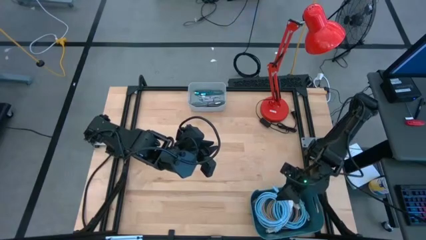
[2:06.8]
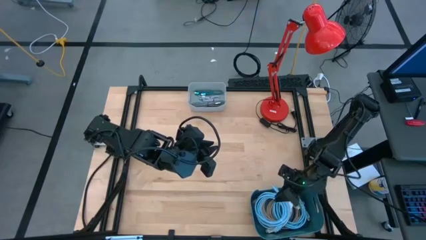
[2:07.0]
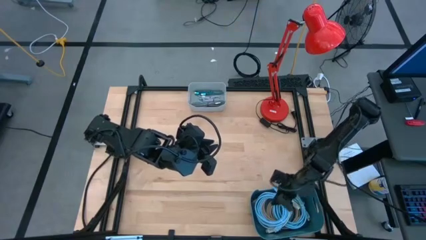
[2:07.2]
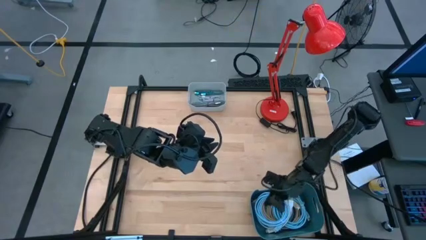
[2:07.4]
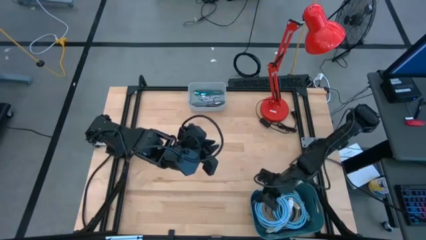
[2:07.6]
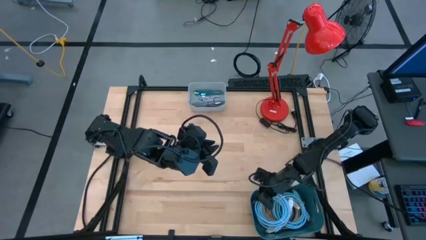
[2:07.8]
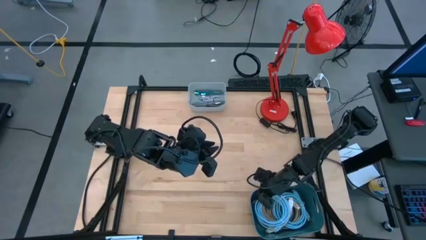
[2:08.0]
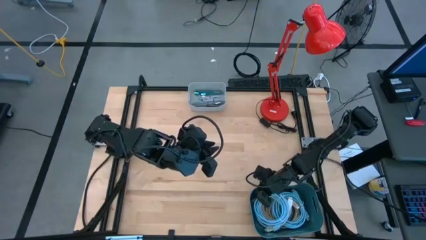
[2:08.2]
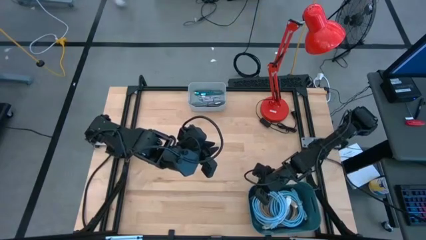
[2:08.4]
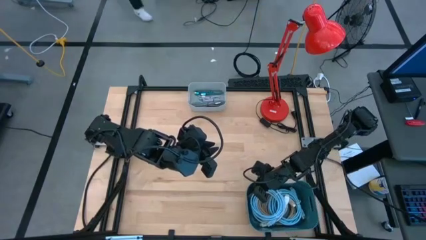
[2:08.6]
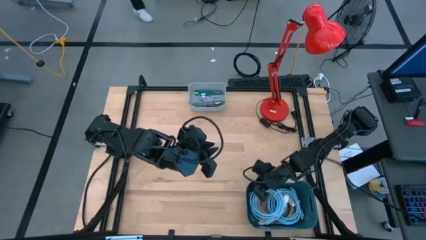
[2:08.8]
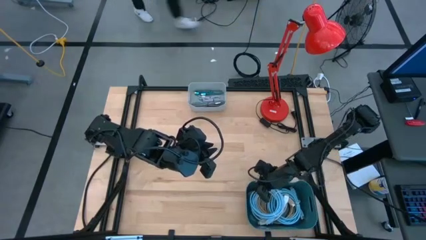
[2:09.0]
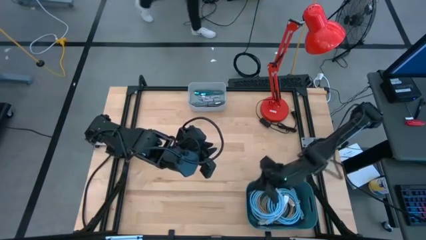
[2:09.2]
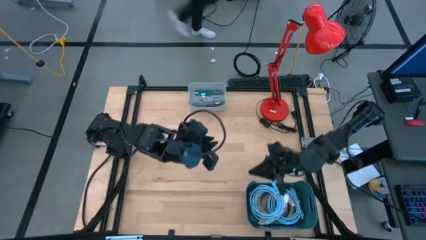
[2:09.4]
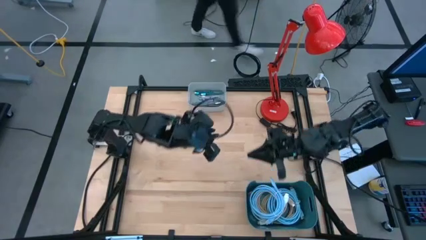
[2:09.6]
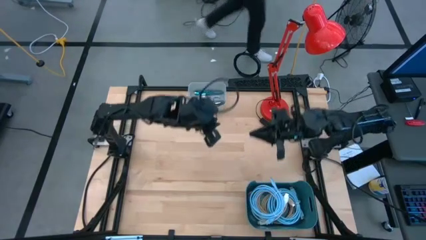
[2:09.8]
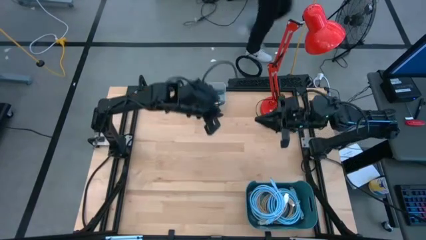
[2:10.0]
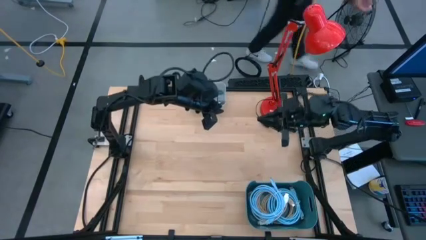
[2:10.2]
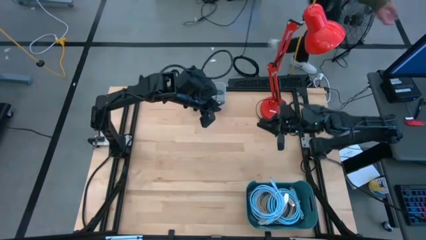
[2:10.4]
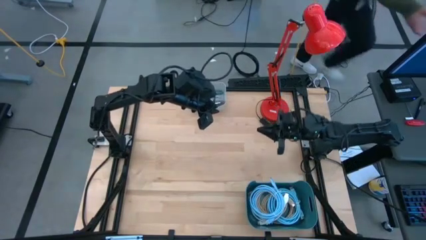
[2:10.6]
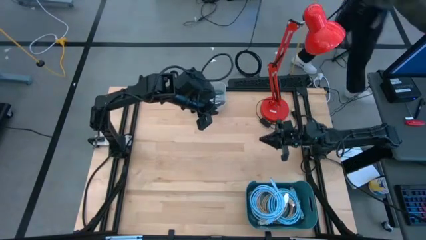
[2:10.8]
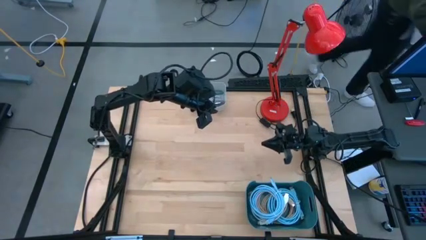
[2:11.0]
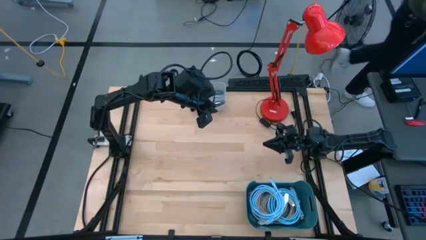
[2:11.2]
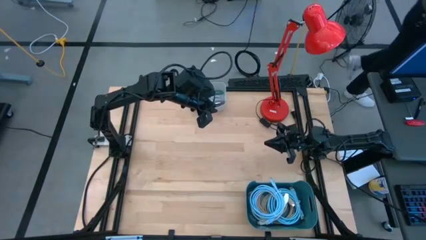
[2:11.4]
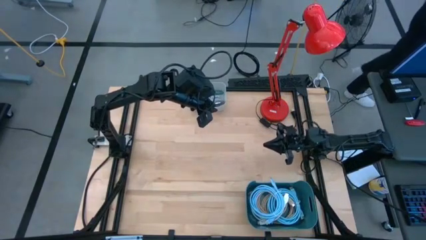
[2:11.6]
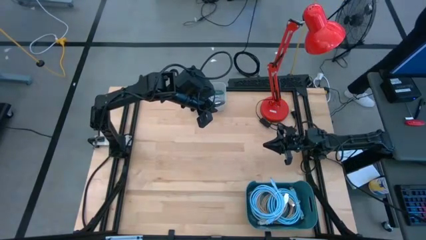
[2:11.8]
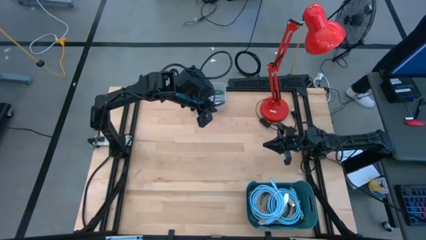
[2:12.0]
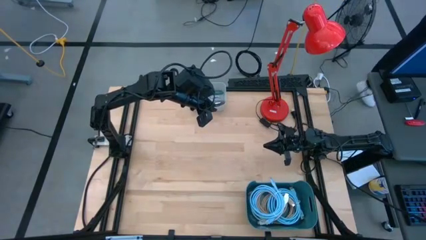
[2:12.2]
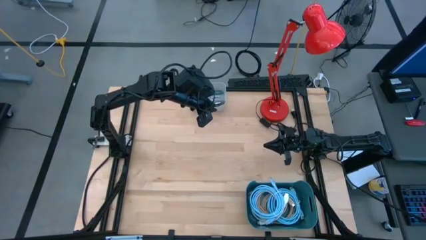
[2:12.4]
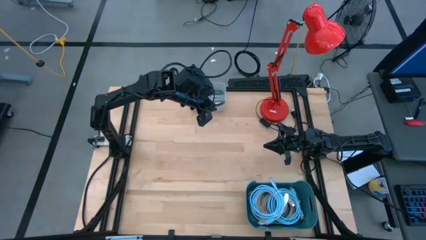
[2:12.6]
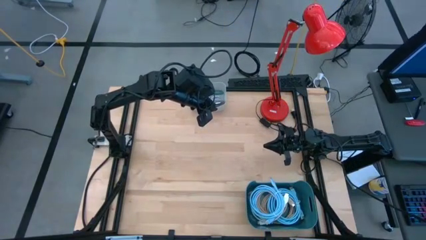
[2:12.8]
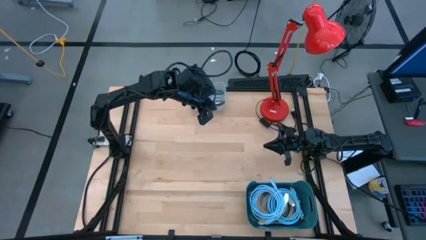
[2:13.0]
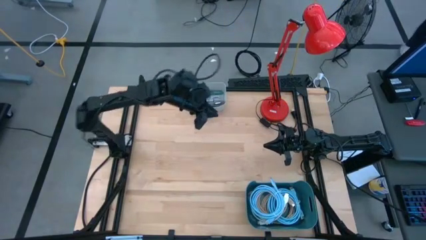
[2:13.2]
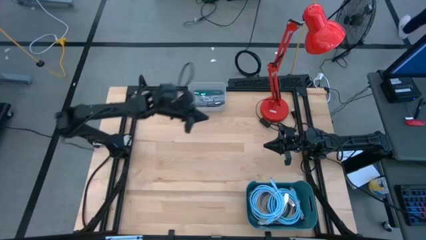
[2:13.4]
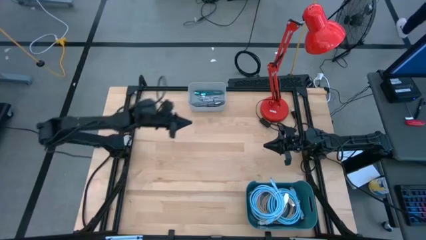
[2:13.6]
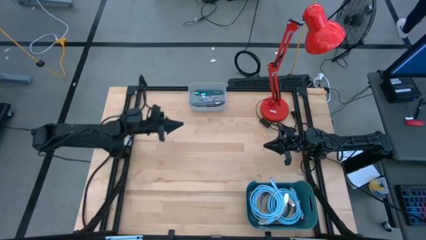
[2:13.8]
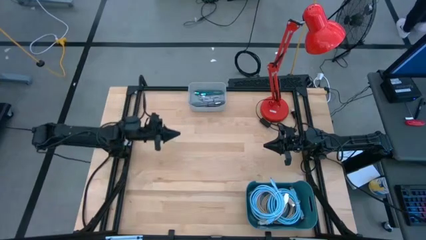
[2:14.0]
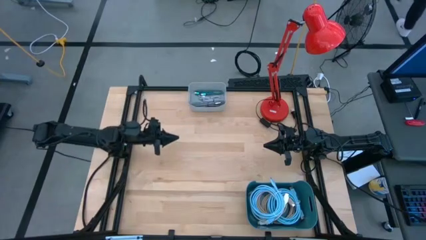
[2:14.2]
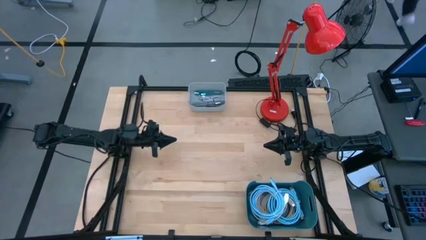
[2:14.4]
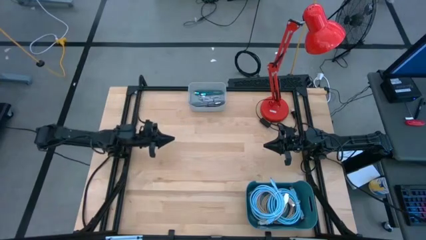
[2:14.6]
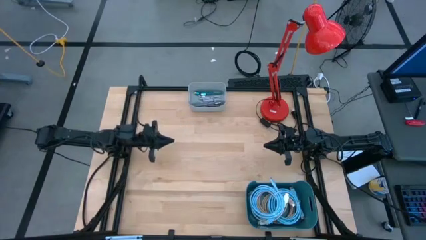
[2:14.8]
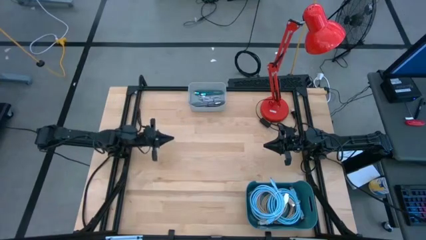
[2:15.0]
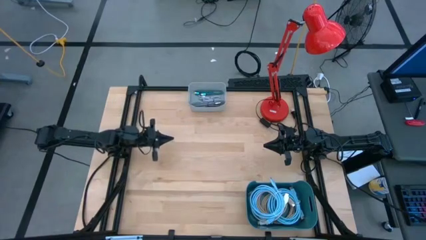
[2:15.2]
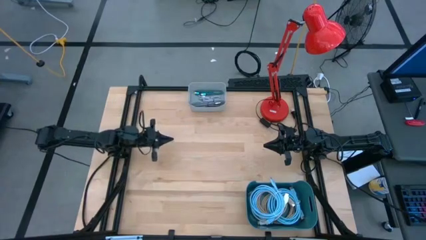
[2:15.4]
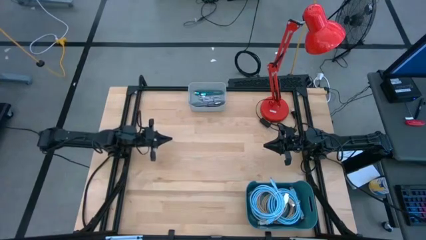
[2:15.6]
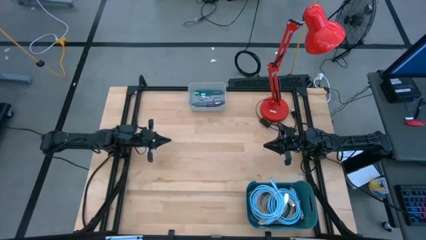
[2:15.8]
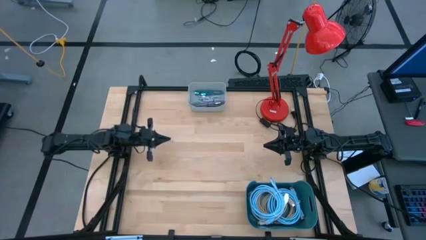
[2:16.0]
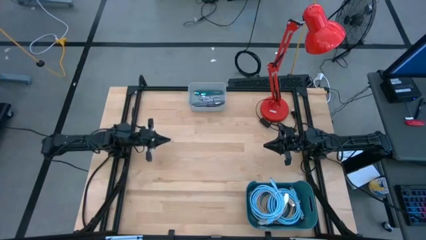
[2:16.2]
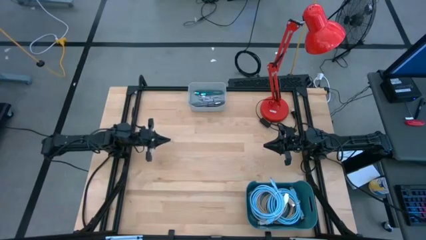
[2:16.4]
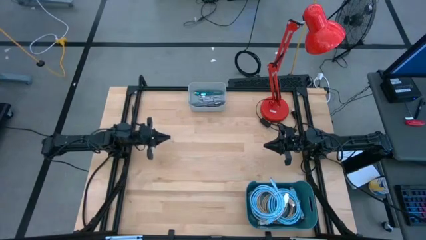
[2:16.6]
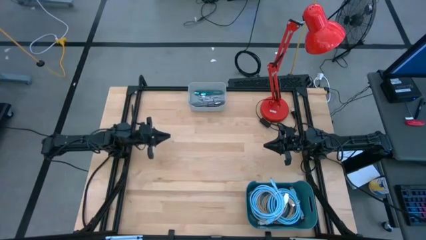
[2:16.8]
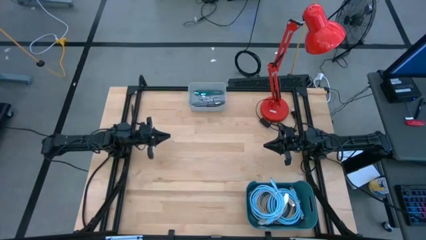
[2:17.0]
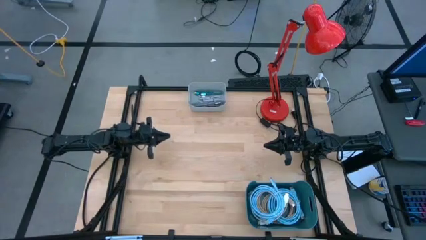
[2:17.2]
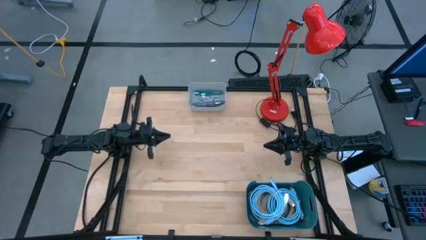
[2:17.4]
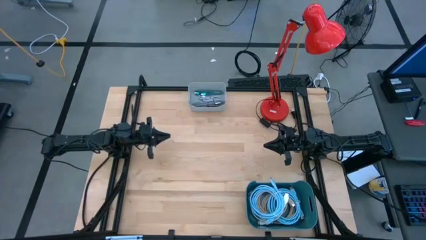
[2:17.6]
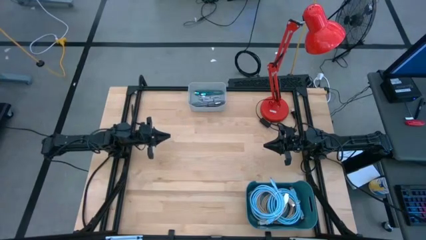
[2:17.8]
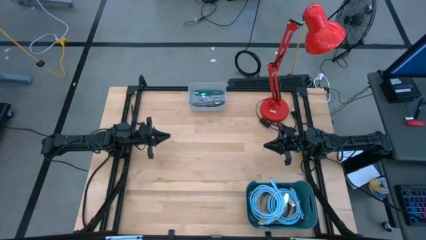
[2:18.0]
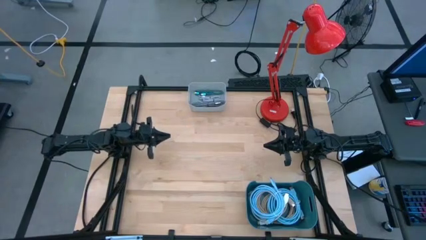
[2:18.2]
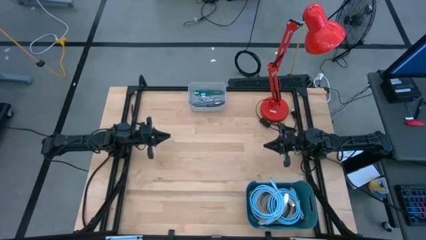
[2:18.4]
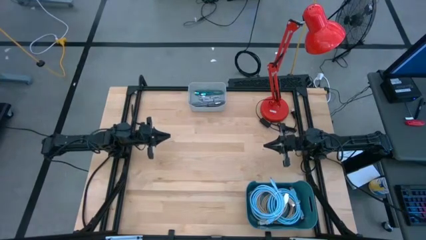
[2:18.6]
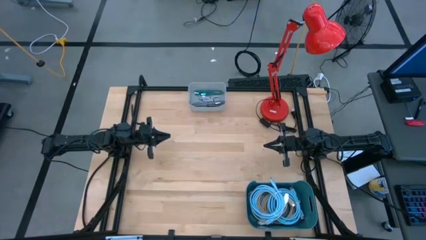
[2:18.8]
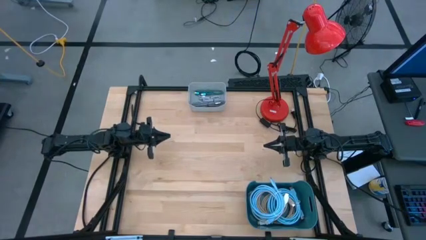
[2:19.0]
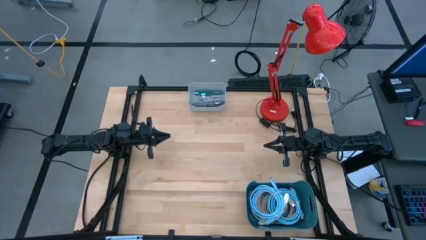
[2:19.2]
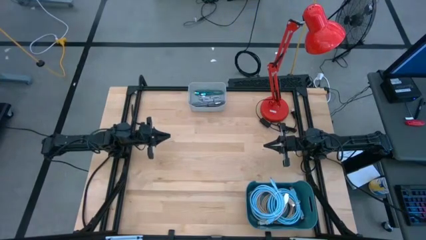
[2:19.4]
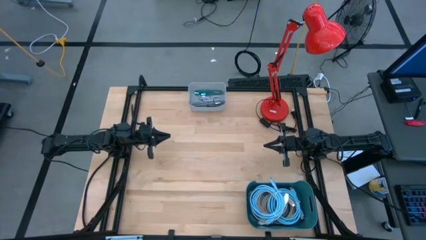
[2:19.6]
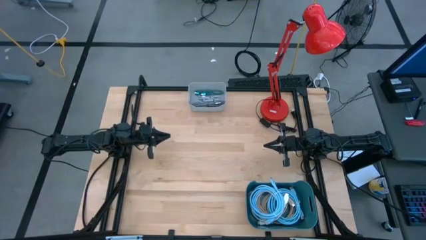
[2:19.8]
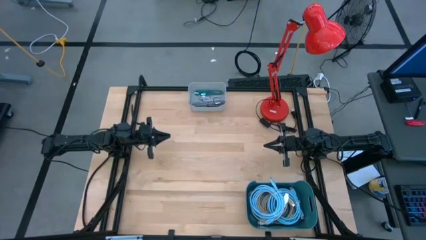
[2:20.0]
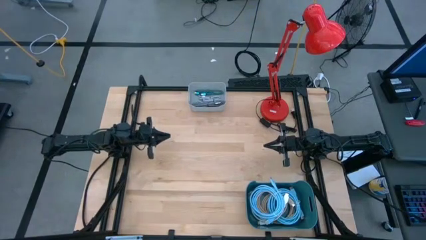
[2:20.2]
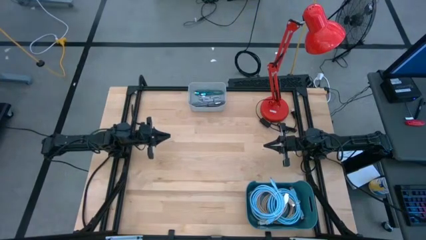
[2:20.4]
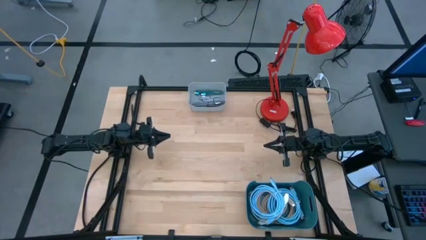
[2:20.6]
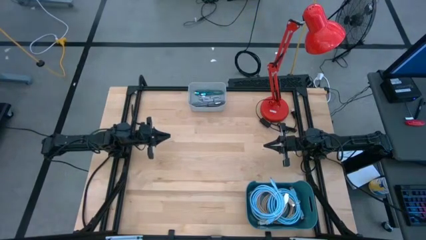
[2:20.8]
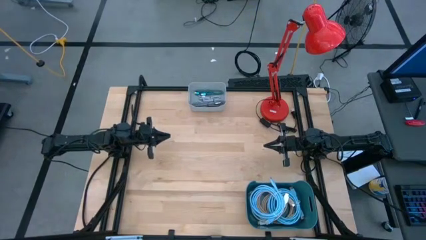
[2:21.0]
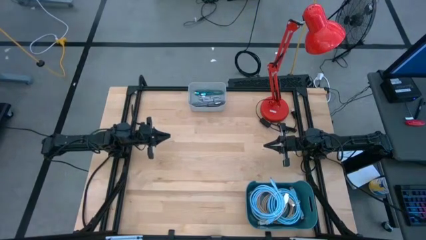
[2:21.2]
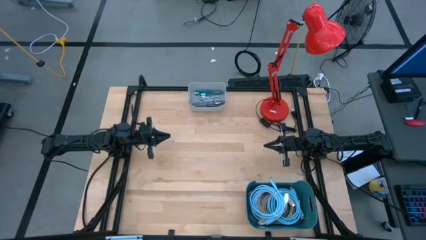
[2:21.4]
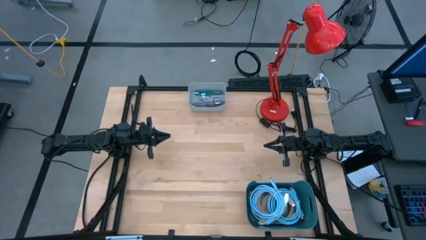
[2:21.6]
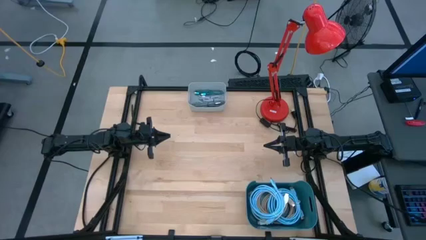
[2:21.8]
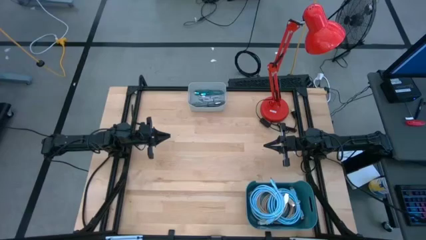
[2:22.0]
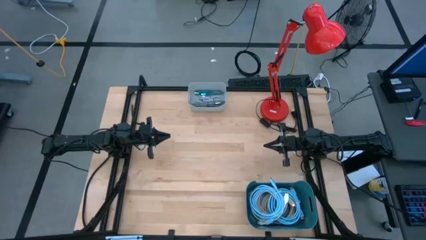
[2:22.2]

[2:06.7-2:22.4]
Task: Pick & Place USB Port
Return to Home Position
